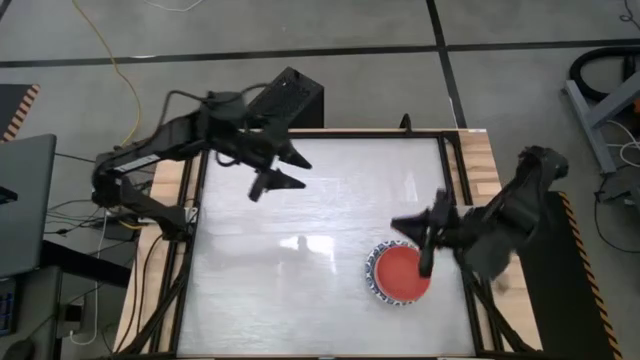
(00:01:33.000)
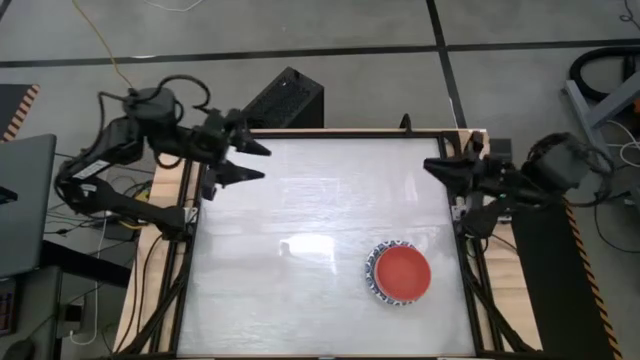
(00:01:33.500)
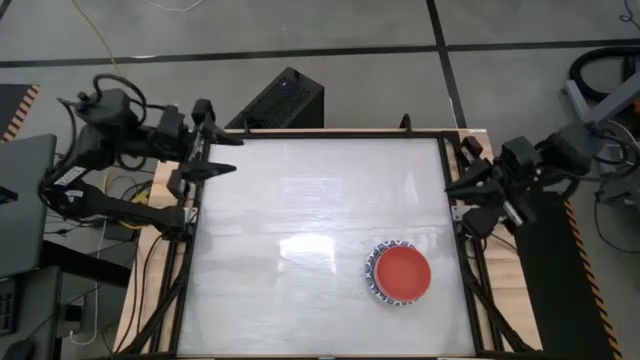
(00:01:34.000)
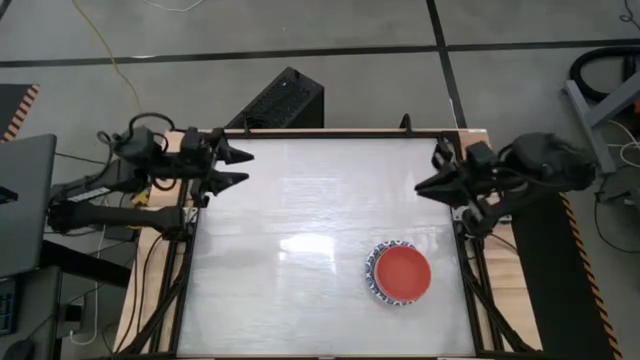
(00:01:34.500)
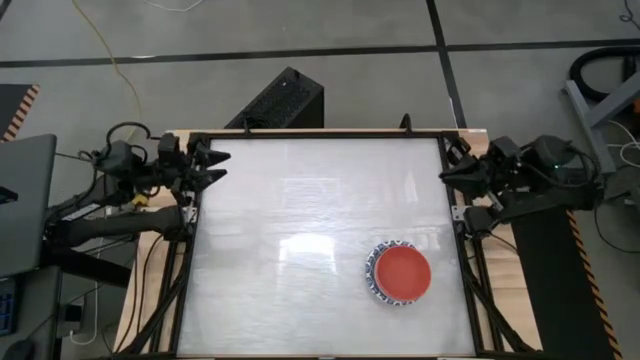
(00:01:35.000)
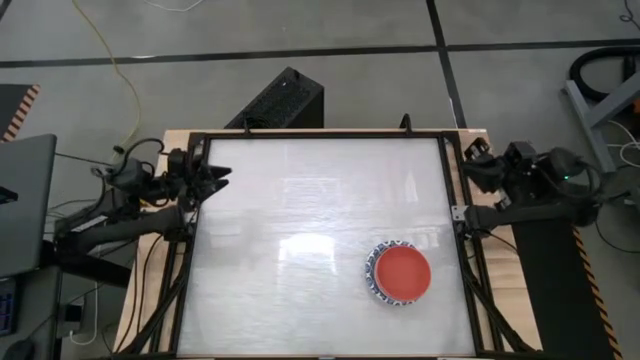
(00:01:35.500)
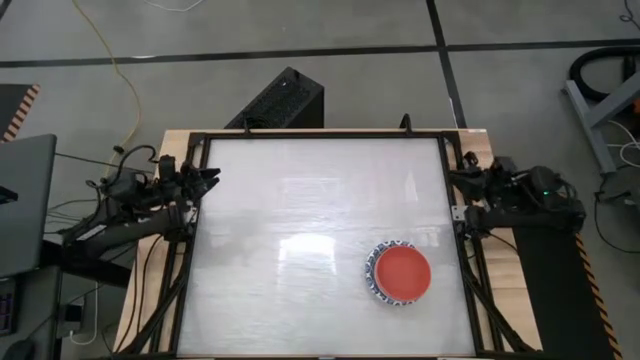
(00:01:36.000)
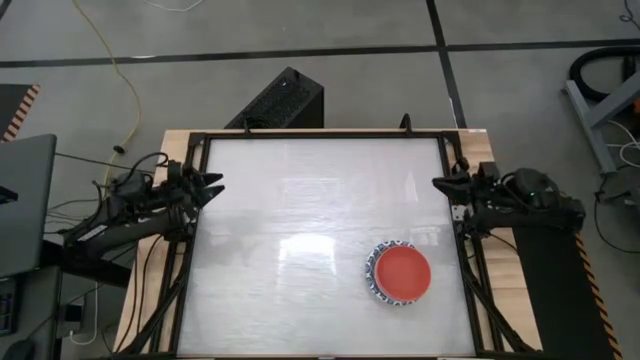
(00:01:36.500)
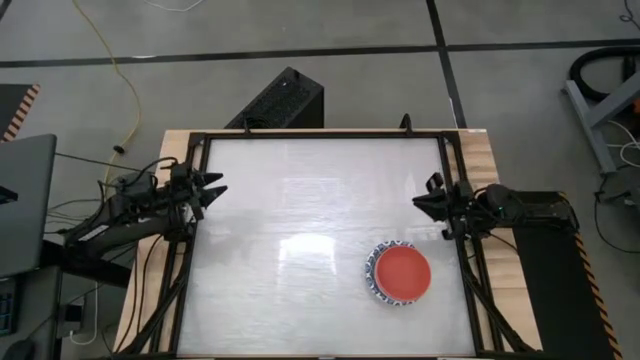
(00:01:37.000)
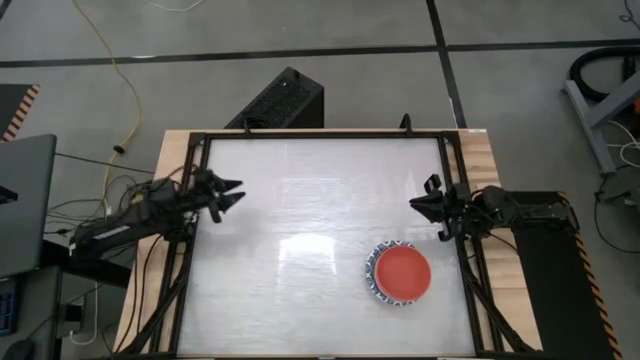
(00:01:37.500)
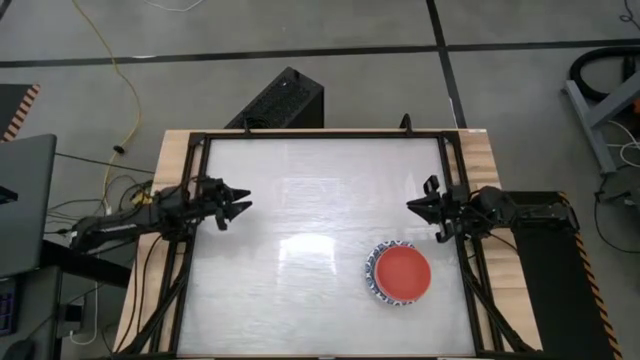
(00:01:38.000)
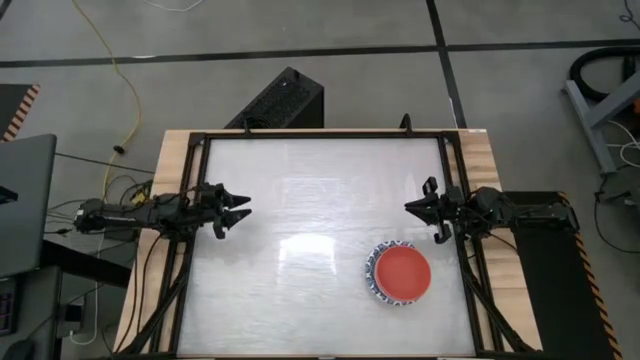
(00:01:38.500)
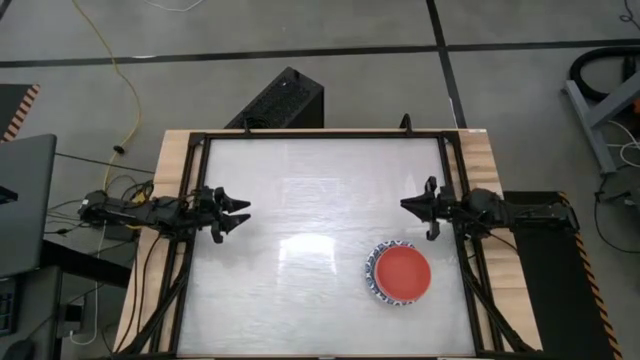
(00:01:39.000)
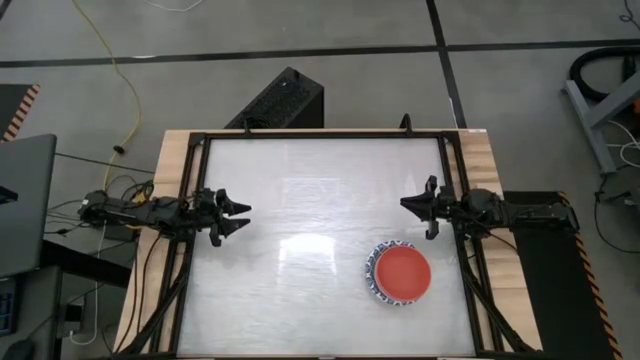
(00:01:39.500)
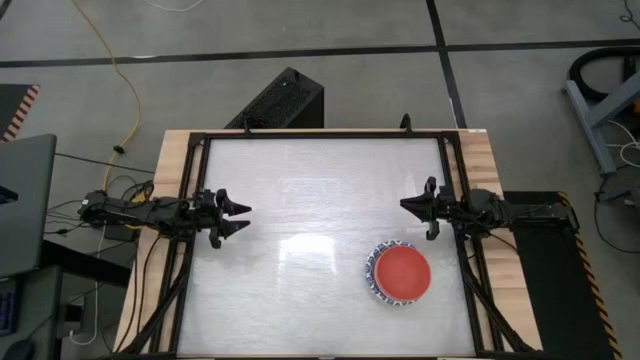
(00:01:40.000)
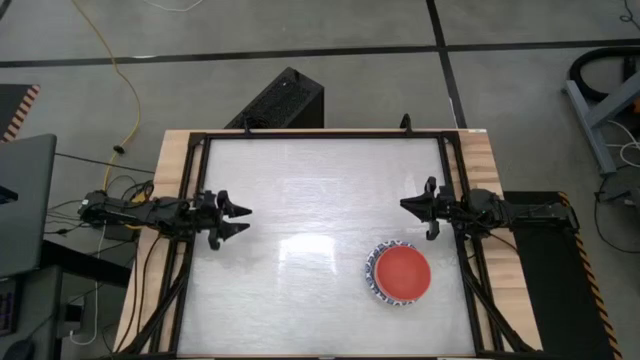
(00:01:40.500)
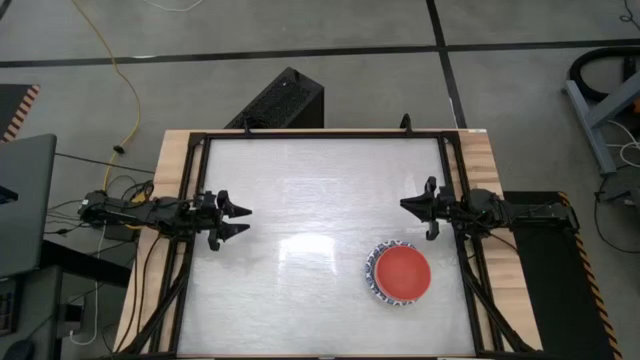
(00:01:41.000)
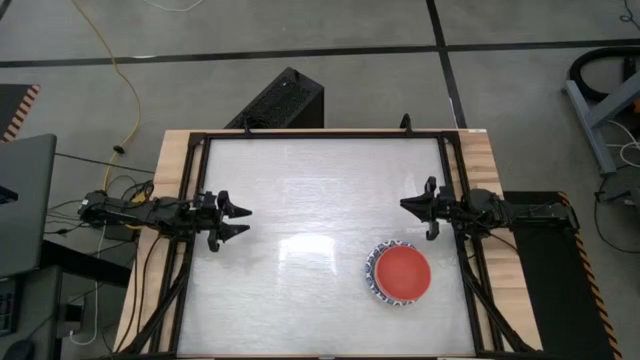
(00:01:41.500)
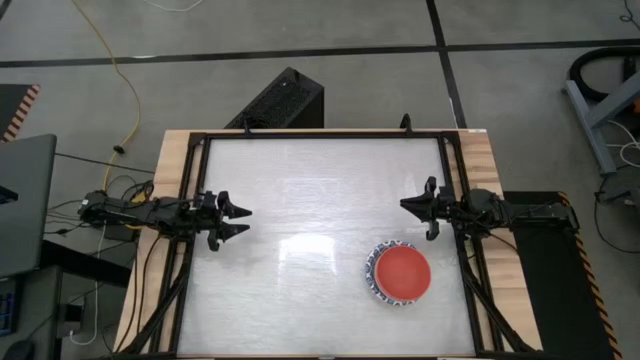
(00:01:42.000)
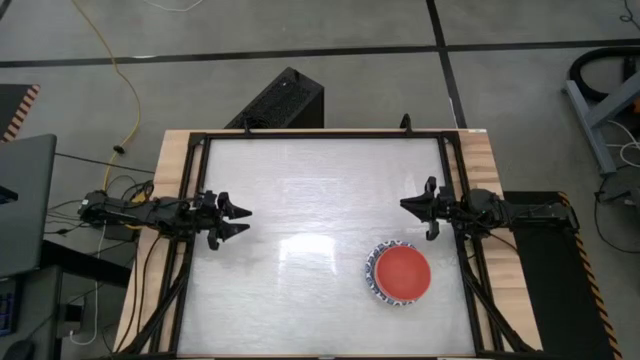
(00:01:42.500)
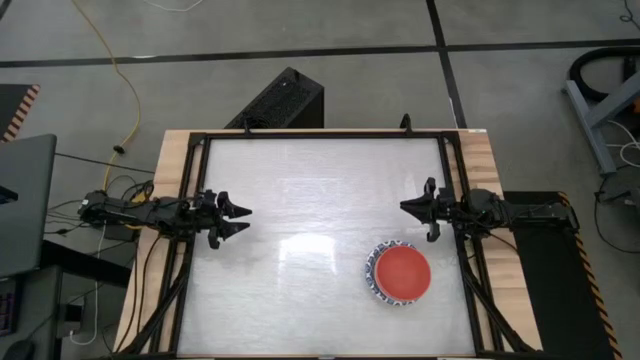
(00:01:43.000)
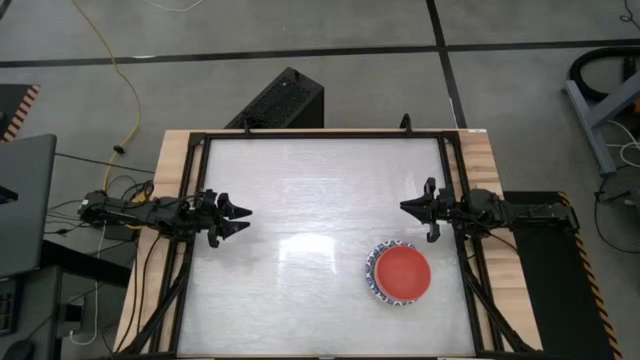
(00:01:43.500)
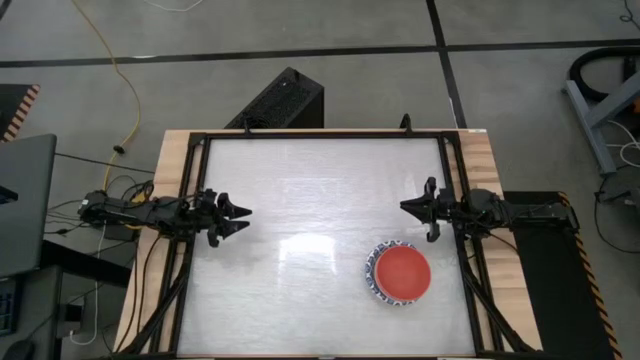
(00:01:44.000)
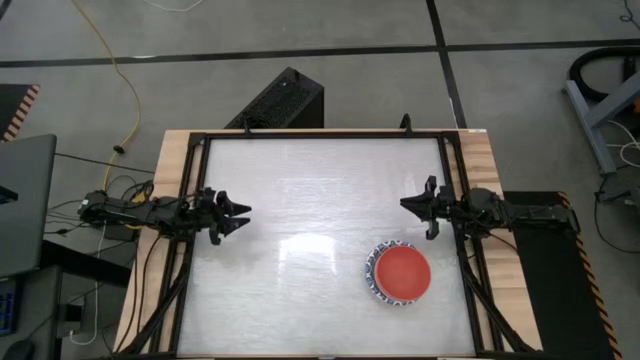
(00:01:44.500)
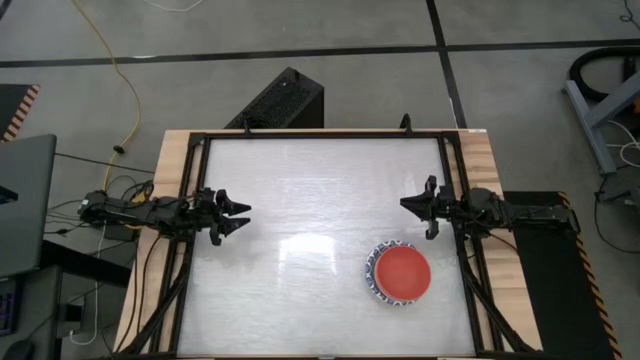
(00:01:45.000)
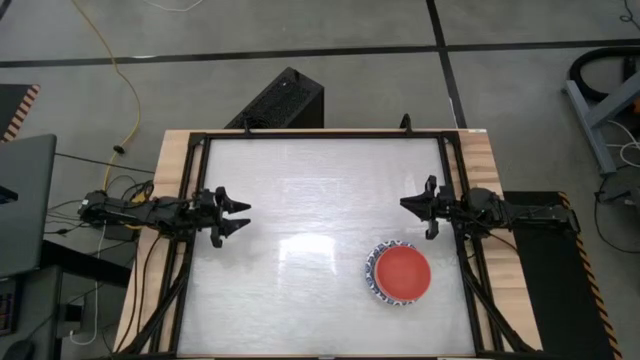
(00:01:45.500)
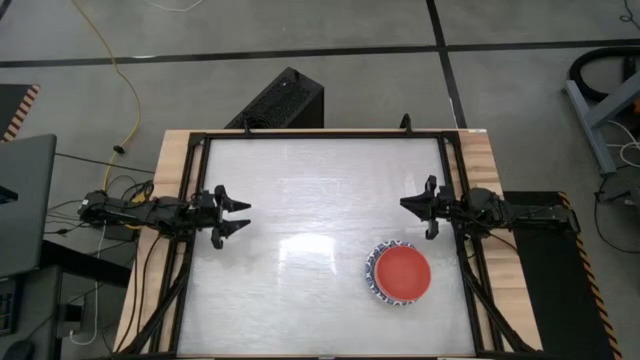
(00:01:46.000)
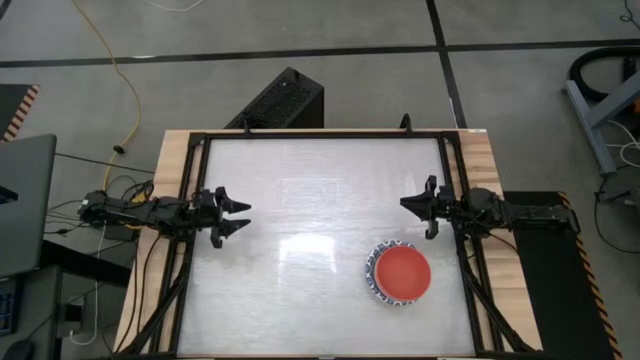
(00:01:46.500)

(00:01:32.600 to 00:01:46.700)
Task: Nest bowls inside each other by size order
Return to Home Position

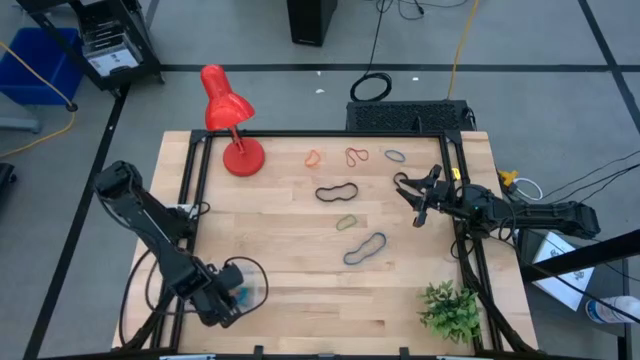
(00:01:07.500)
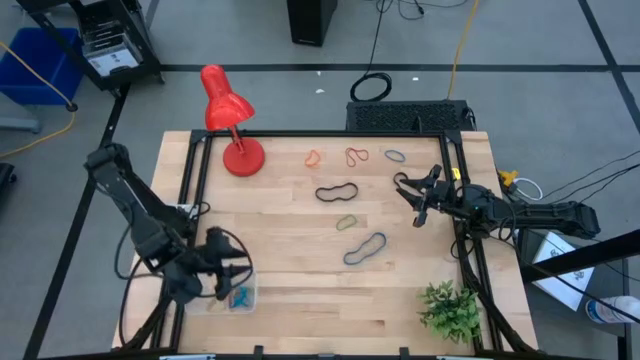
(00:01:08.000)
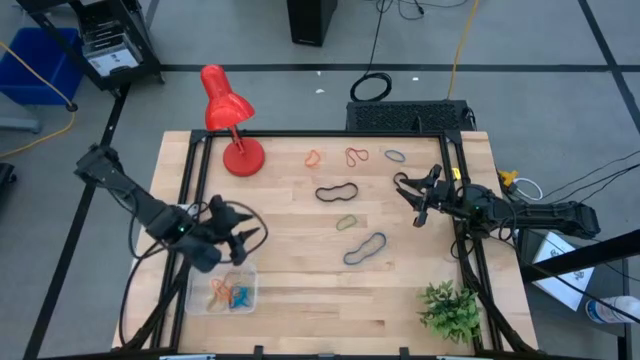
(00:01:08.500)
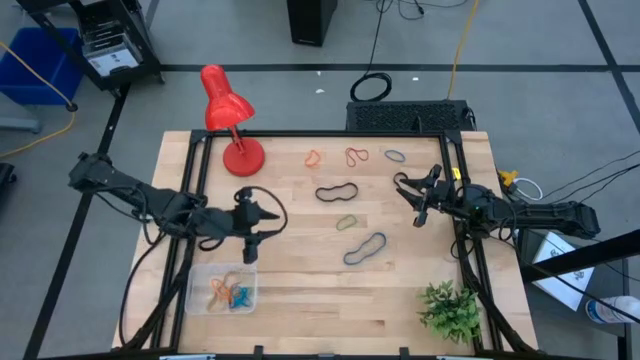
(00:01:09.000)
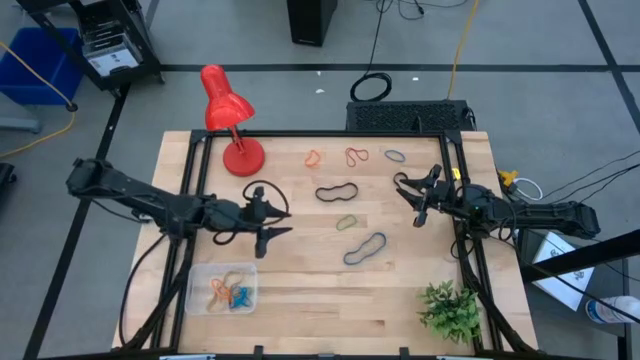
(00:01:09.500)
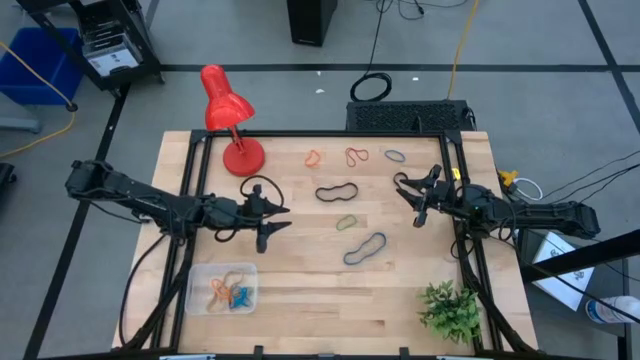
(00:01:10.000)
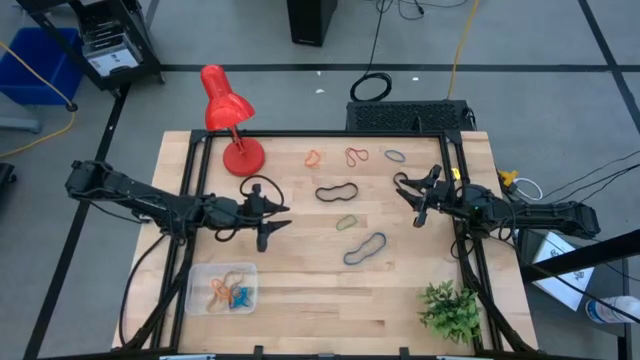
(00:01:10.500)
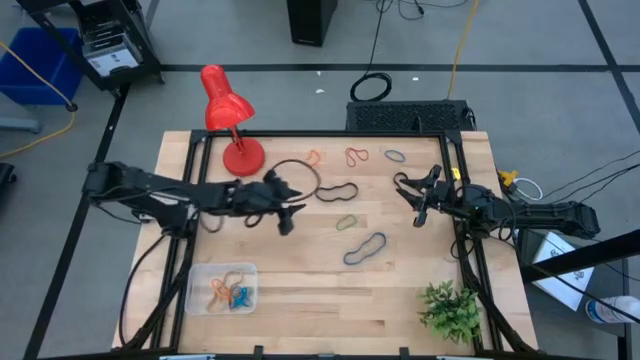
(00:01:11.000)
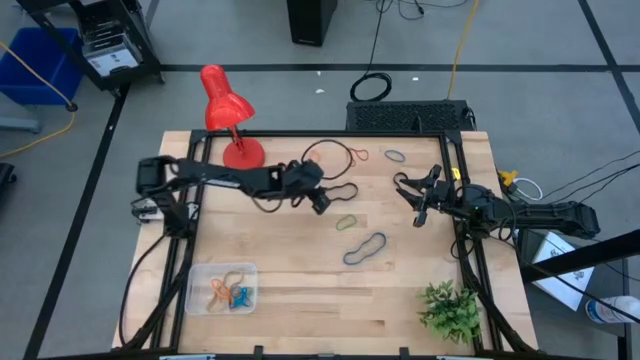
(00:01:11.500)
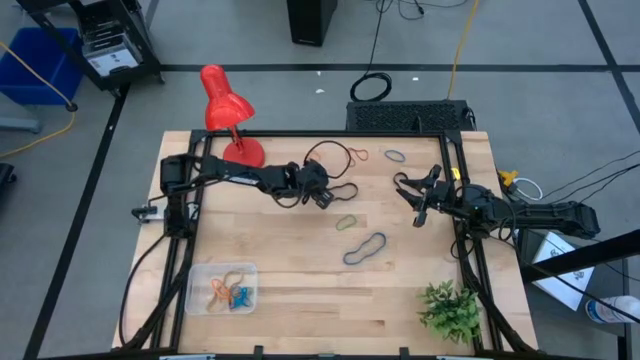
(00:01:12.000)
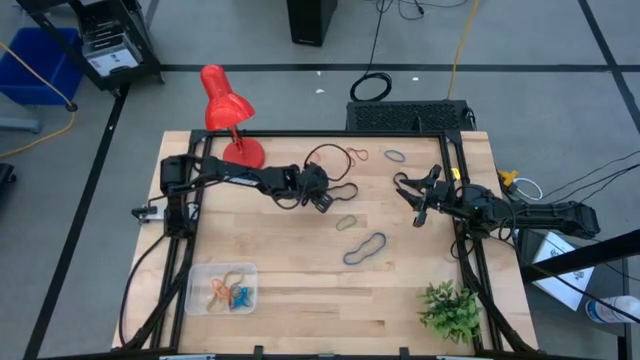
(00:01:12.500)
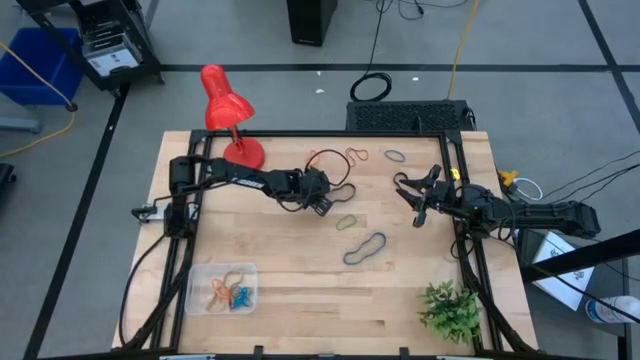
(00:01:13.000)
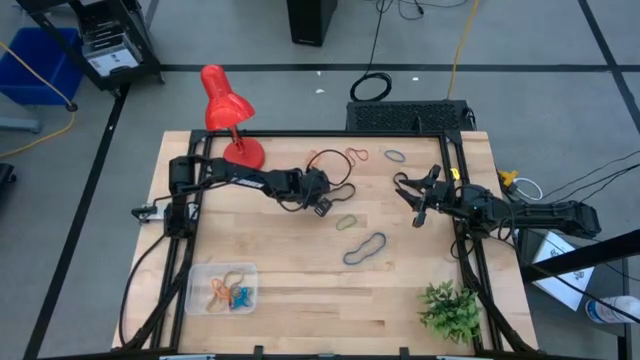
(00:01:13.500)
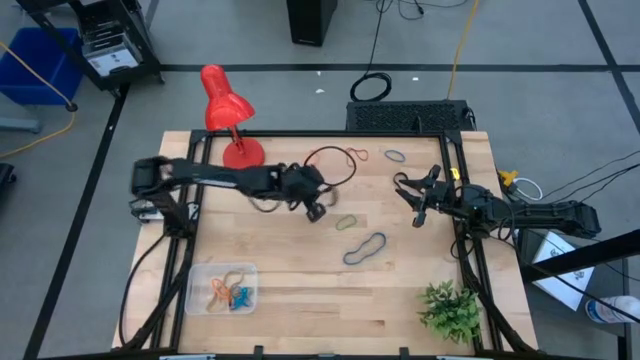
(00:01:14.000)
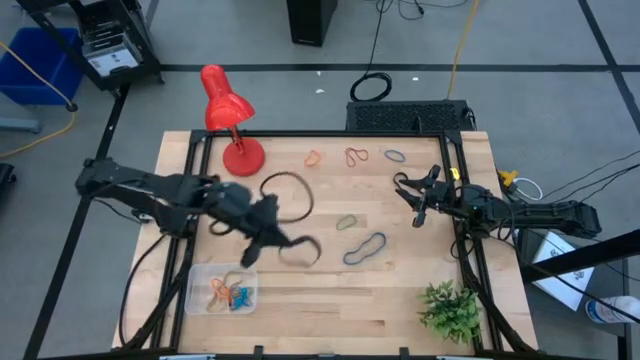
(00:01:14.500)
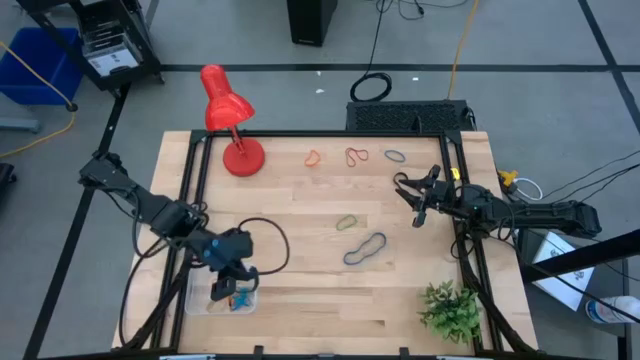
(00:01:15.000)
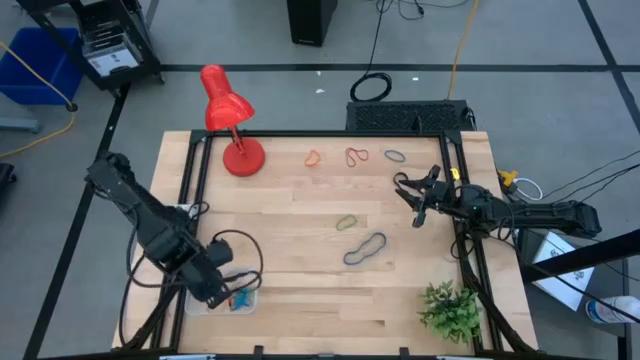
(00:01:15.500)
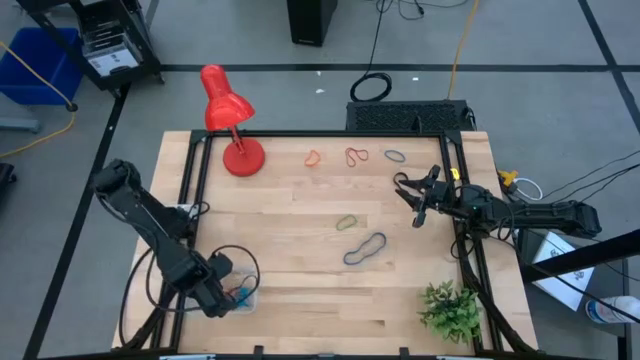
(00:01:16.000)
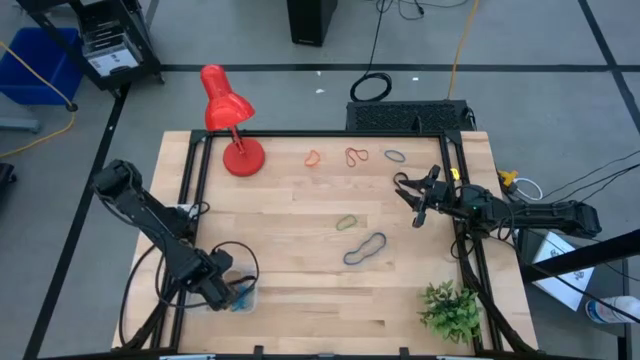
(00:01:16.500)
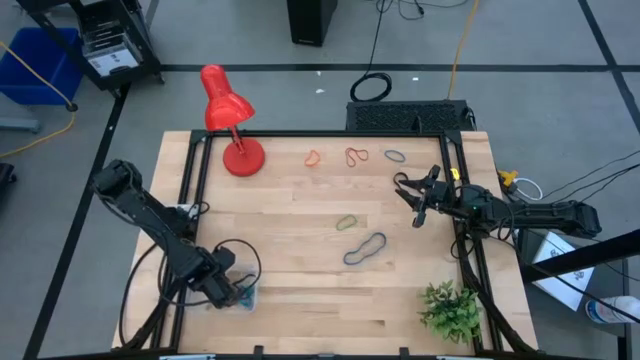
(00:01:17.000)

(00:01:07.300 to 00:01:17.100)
Task: Pick and place rubber bands into bin
Put the left black rubber band into the transparent bin
